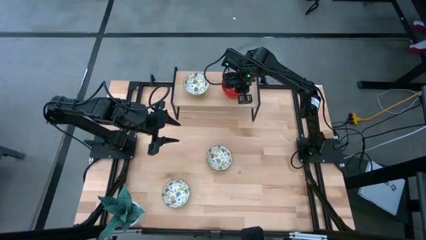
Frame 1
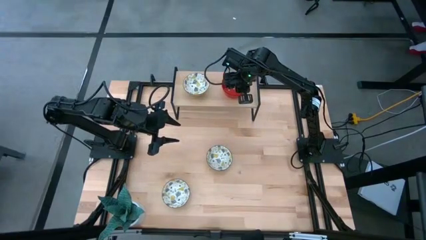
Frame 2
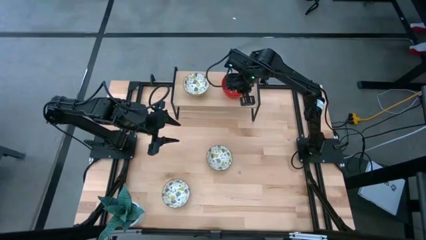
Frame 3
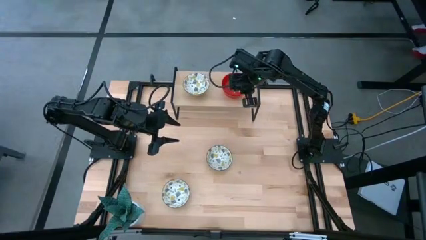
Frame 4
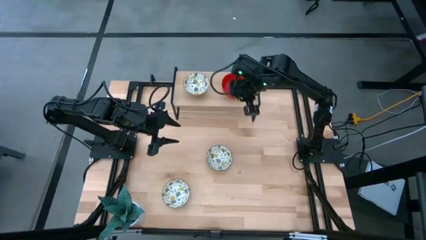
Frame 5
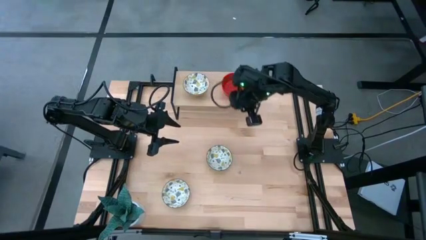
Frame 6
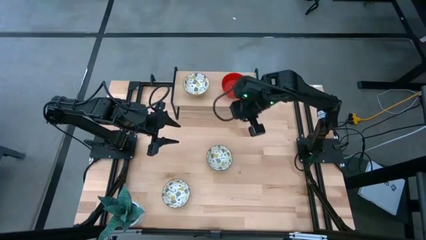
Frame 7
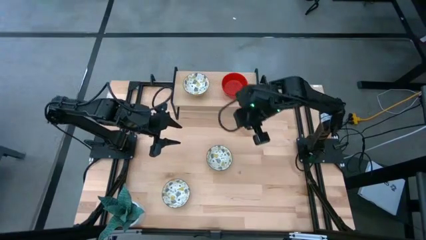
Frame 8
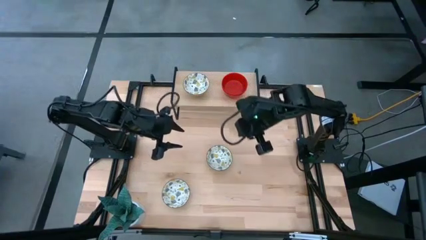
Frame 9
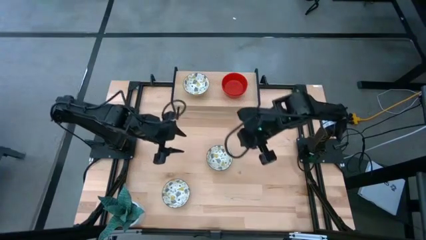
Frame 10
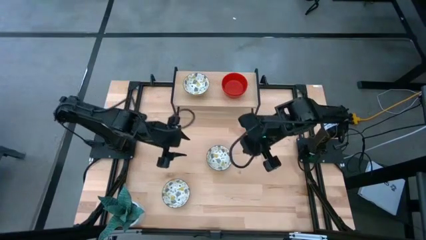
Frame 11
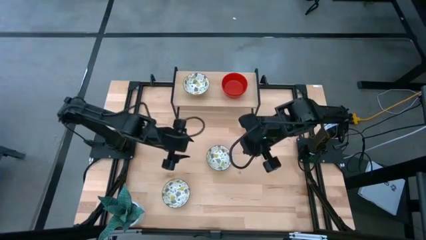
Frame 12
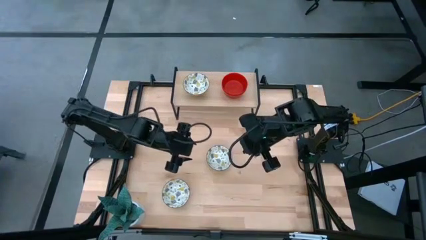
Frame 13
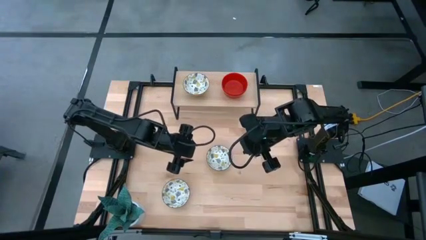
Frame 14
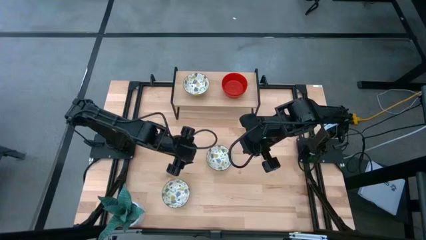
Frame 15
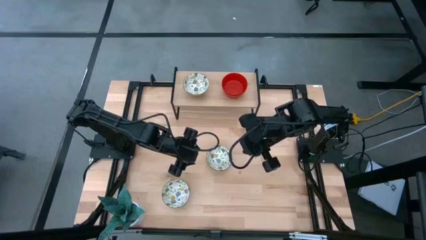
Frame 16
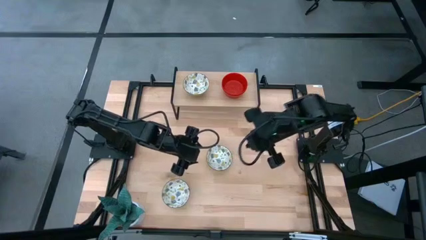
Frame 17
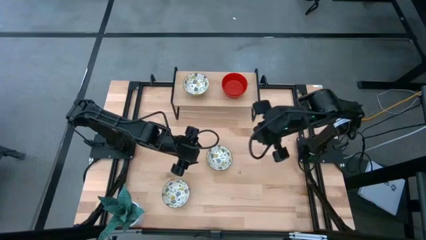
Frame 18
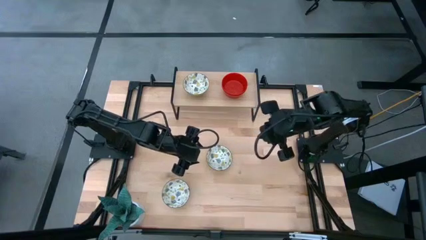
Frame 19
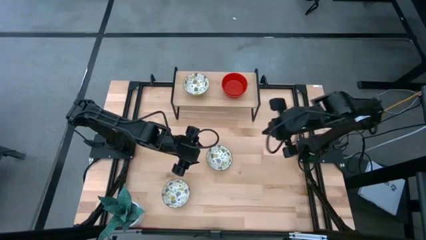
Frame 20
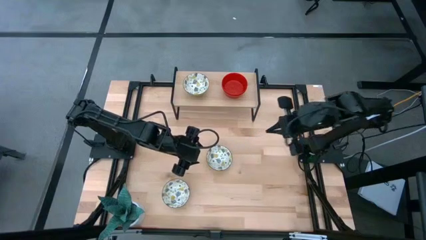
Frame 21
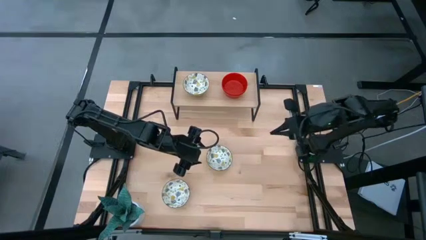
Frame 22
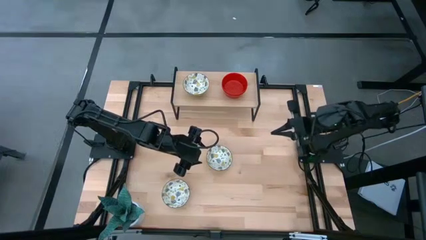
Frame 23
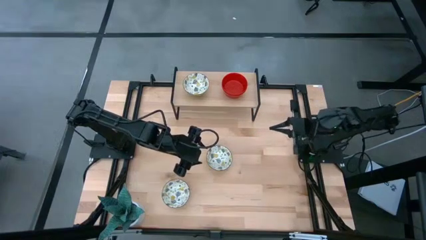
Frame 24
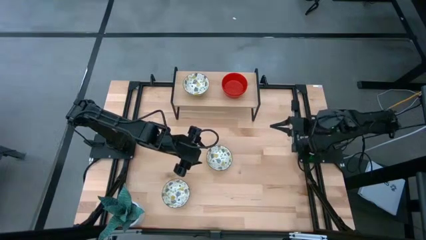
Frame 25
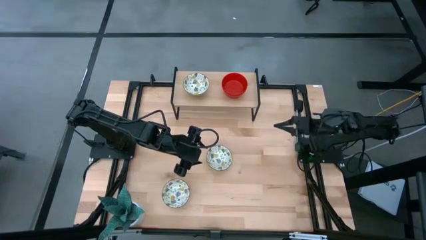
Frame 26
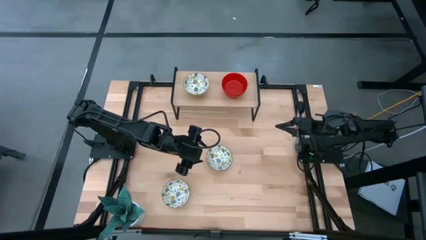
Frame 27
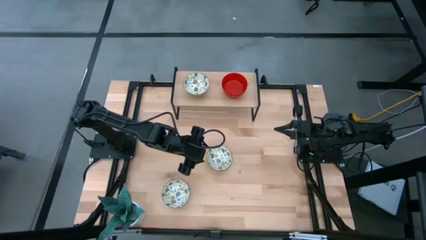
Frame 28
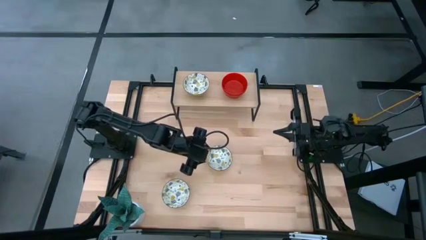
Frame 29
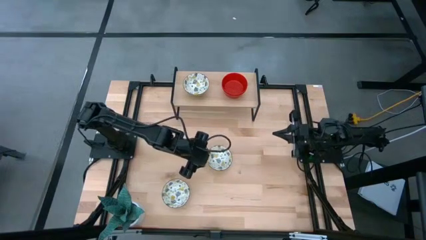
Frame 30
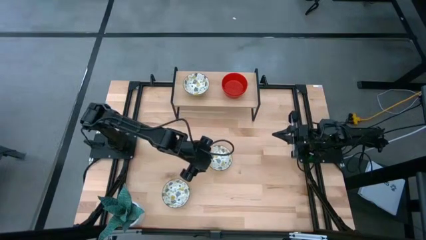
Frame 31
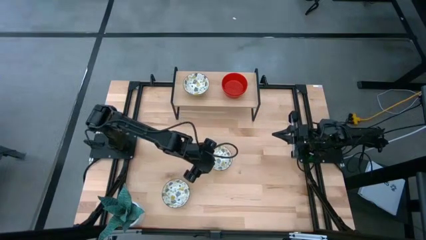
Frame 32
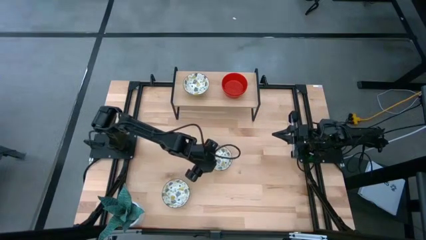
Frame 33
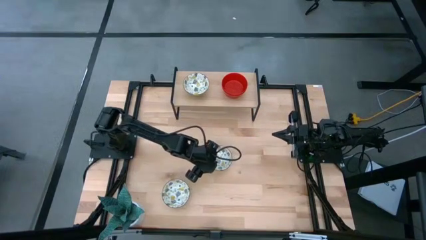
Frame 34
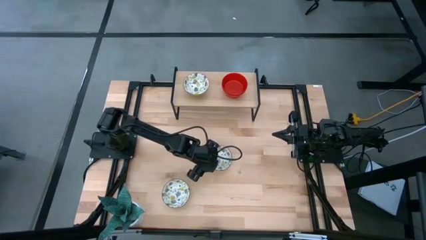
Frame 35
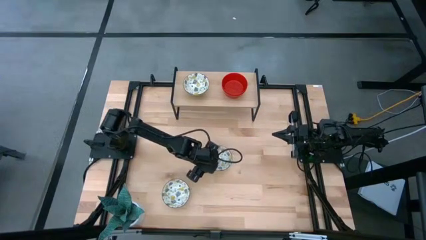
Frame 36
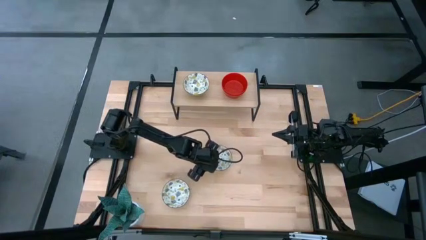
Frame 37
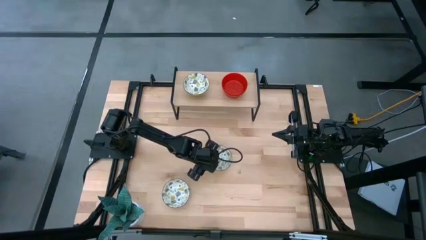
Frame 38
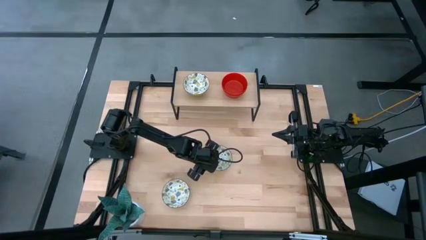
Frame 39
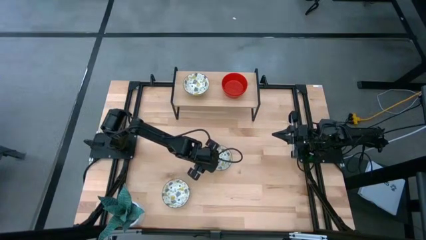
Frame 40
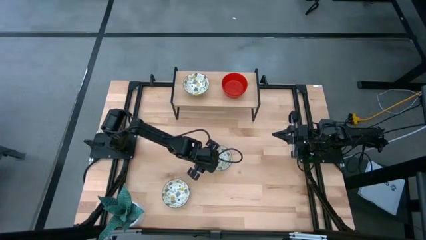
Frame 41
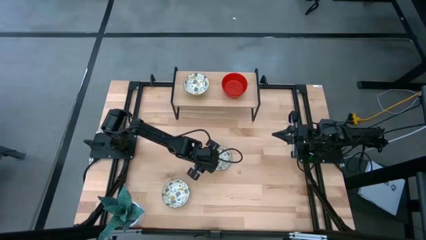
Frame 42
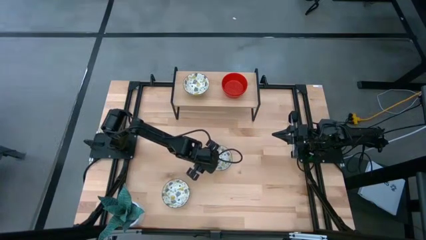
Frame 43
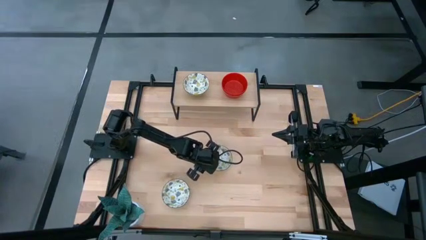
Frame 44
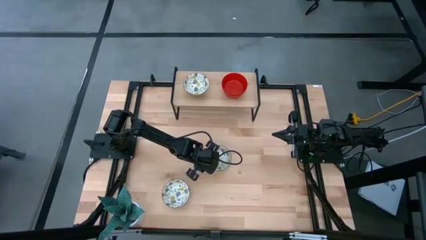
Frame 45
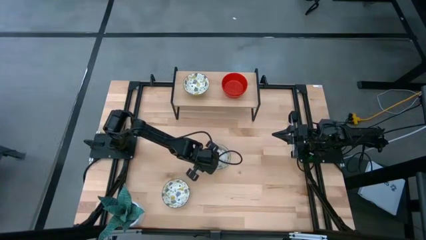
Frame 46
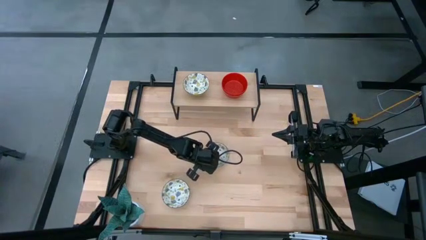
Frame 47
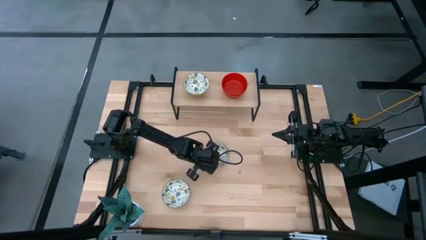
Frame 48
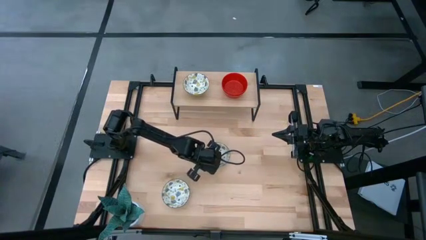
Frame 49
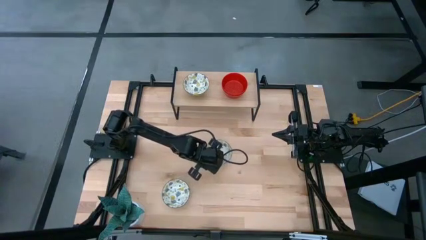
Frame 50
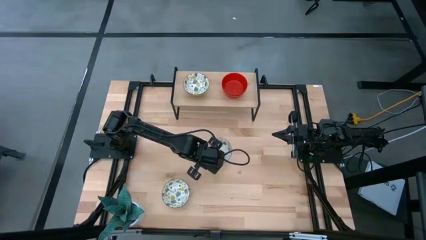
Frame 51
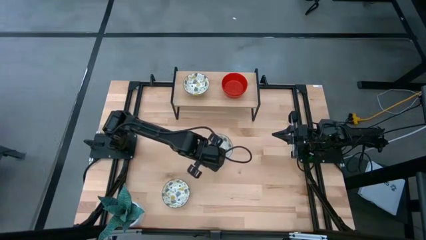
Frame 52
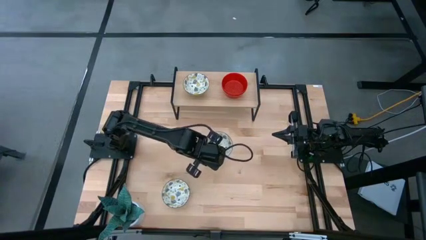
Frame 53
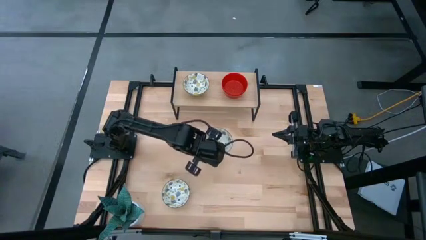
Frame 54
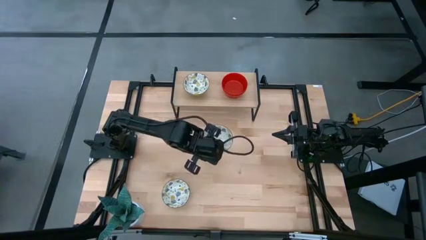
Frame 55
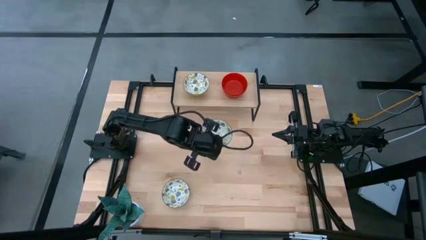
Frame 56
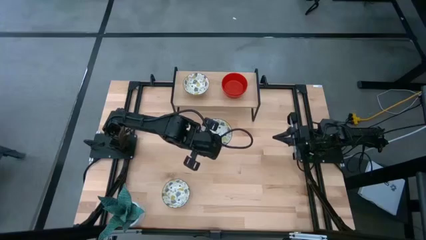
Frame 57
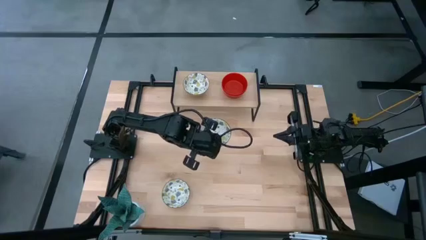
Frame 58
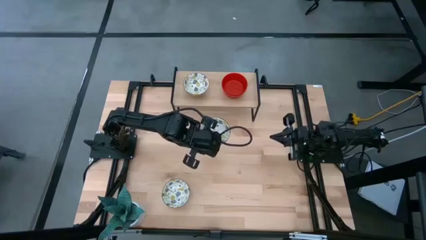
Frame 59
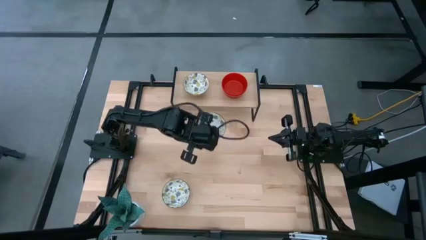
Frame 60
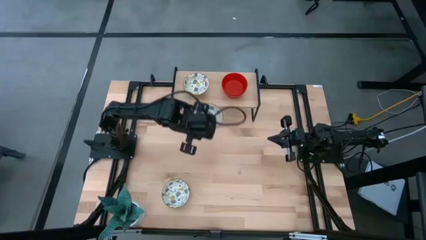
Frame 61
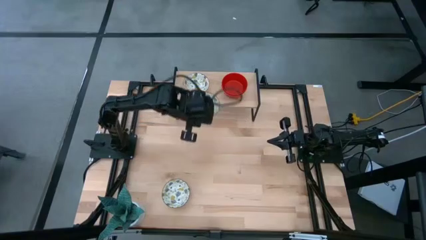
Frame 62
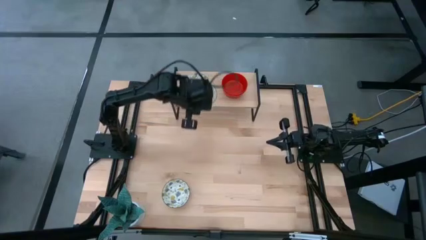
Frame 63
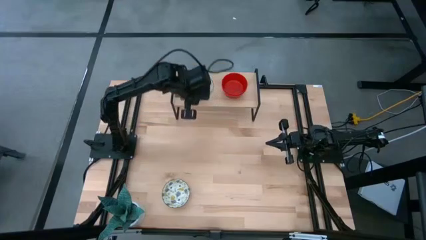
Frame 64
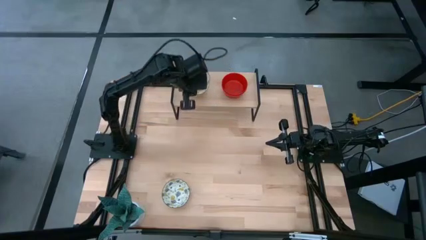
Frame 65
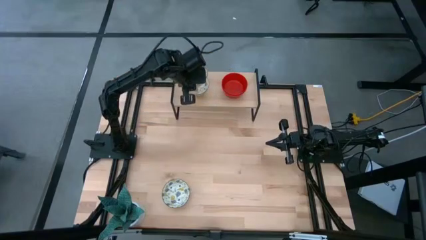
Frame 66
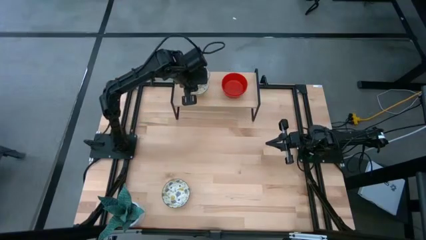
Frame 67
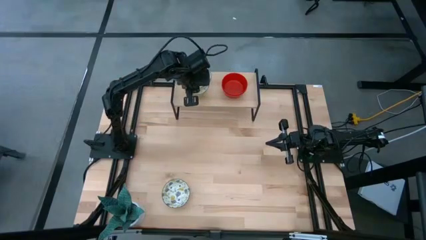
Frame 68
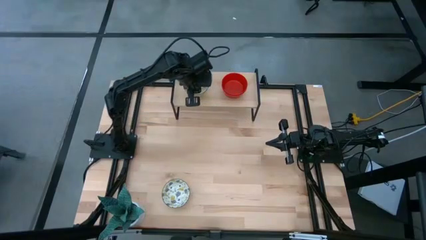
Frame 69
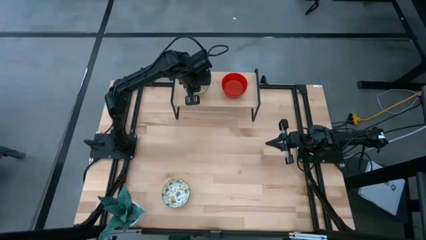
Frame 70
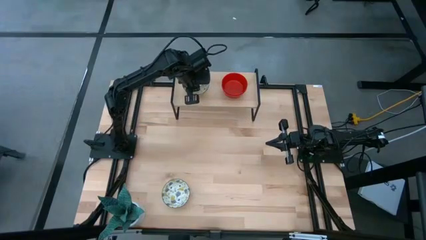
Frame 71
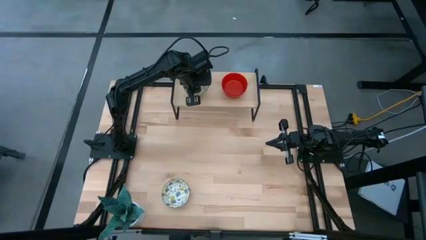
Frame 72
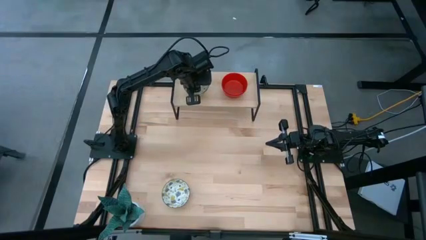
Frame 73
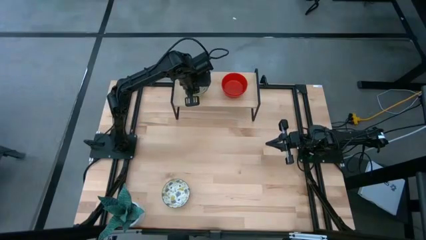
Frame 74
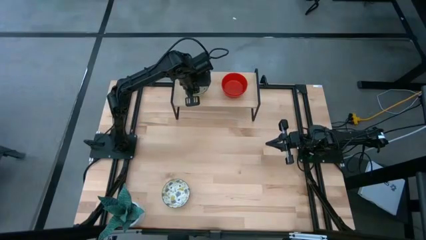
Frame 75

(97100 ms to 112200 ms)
Task: Pick & Place Mini bowls
Stack the right white patterned bowl on top of the white patterned bowl on the shelf
